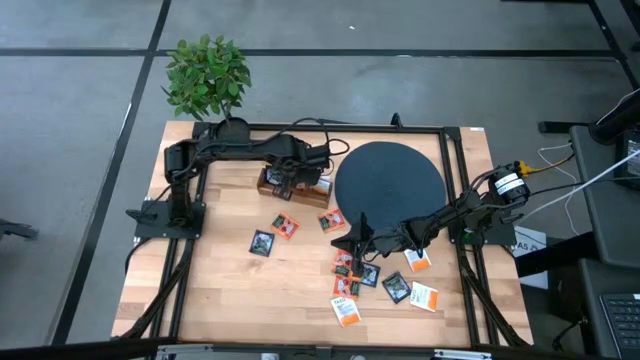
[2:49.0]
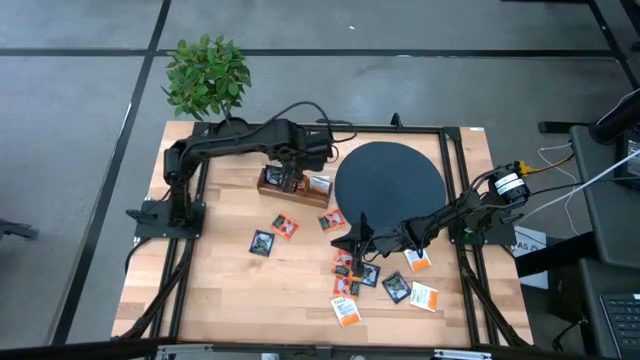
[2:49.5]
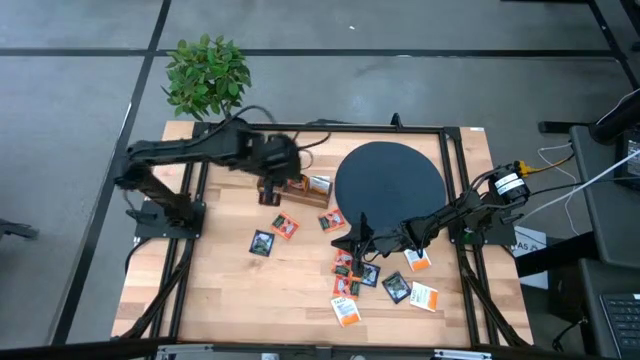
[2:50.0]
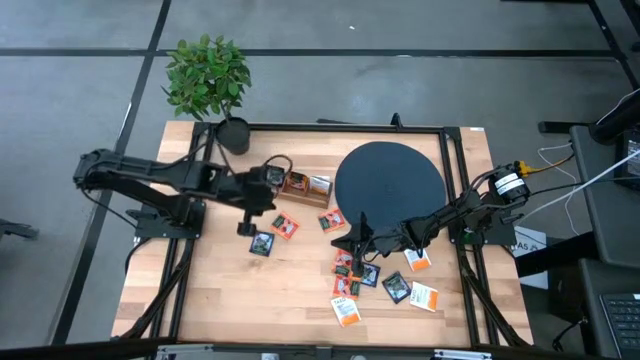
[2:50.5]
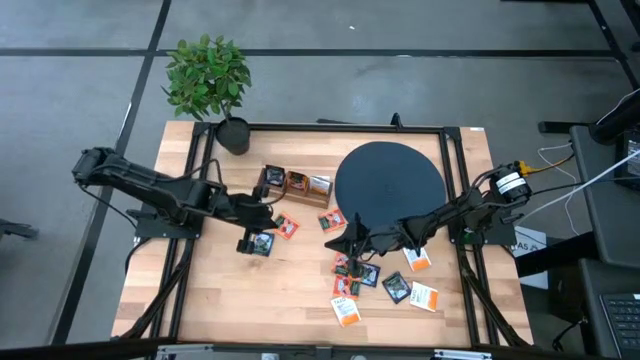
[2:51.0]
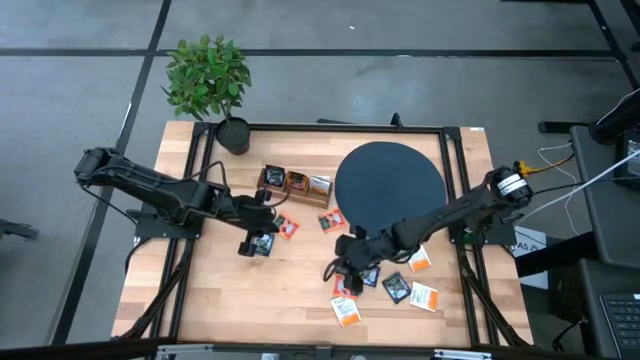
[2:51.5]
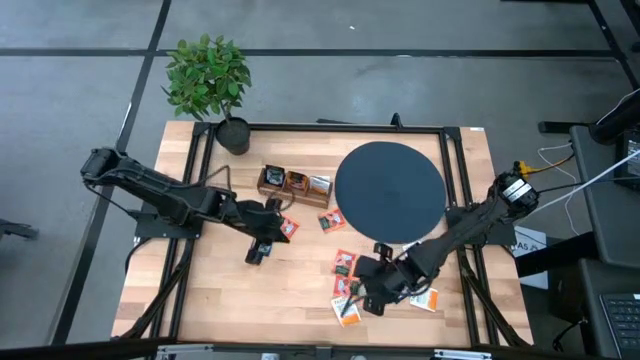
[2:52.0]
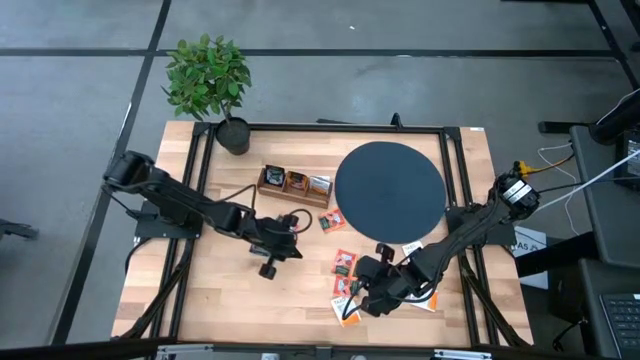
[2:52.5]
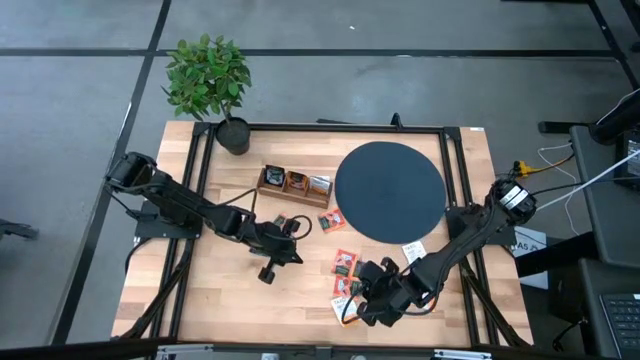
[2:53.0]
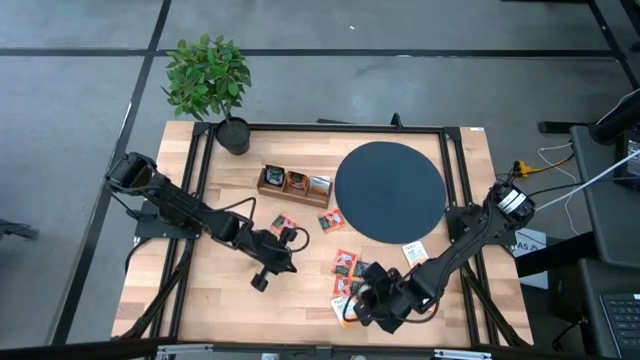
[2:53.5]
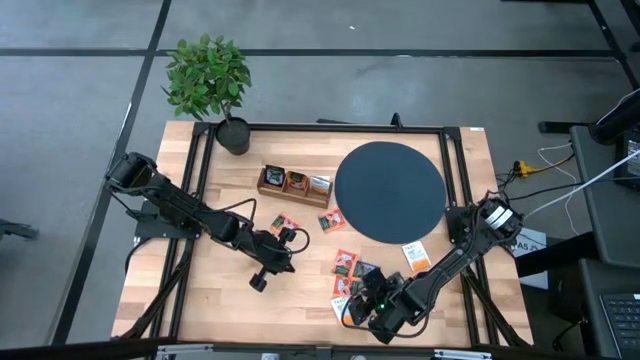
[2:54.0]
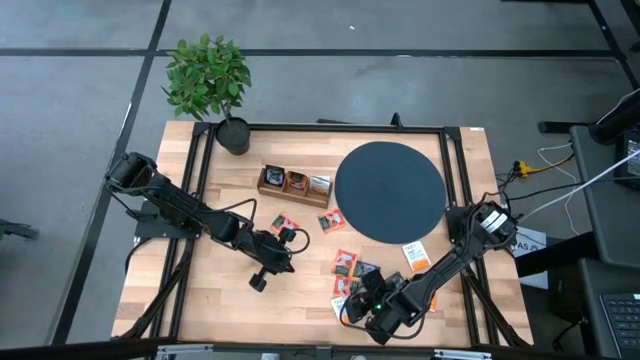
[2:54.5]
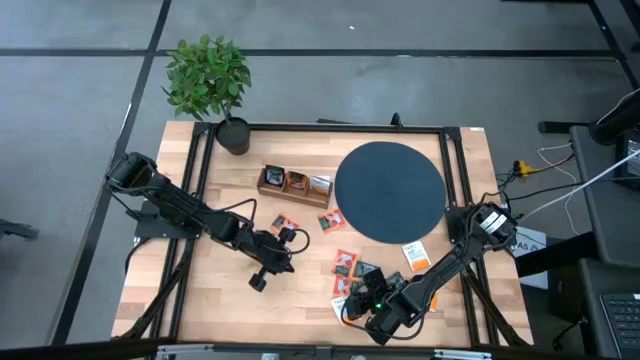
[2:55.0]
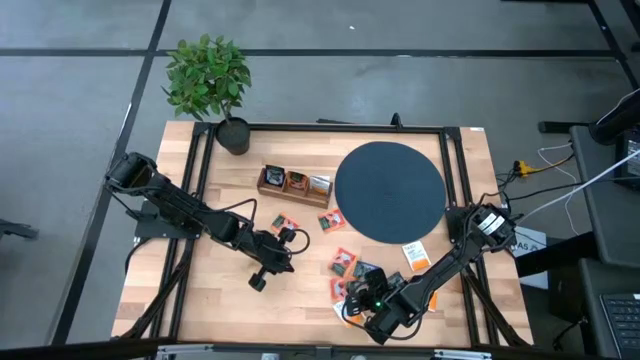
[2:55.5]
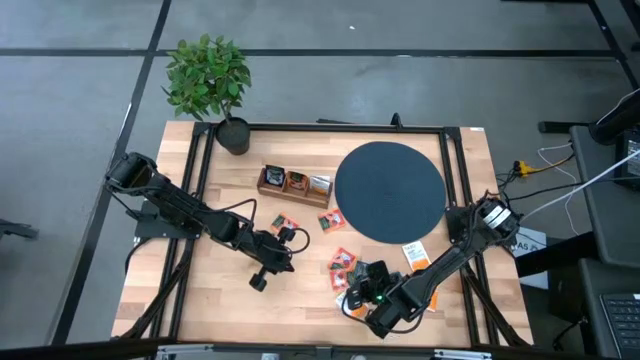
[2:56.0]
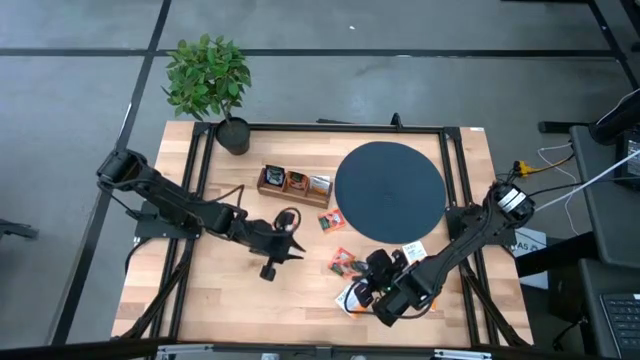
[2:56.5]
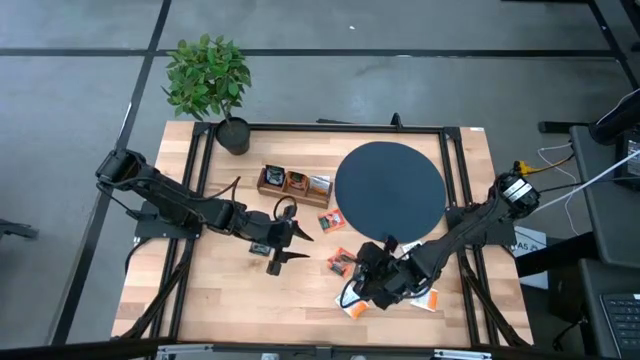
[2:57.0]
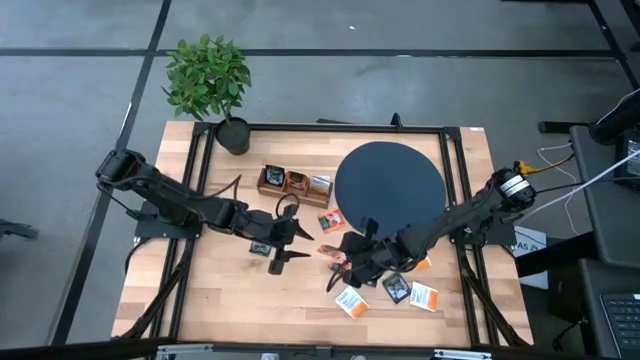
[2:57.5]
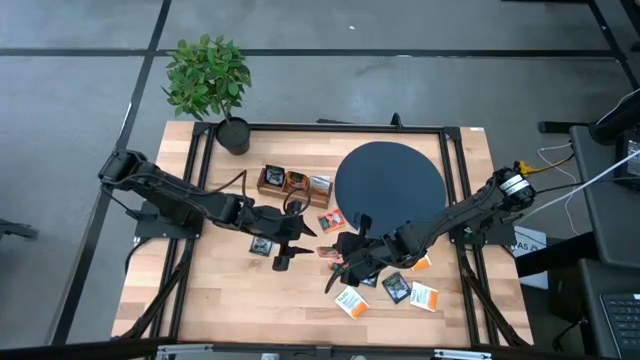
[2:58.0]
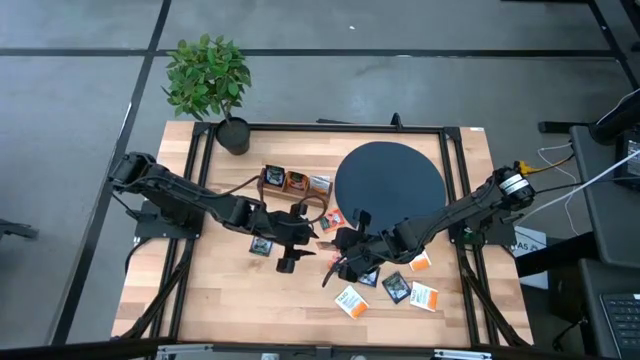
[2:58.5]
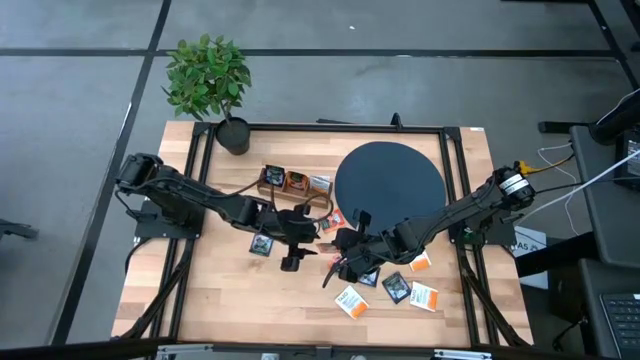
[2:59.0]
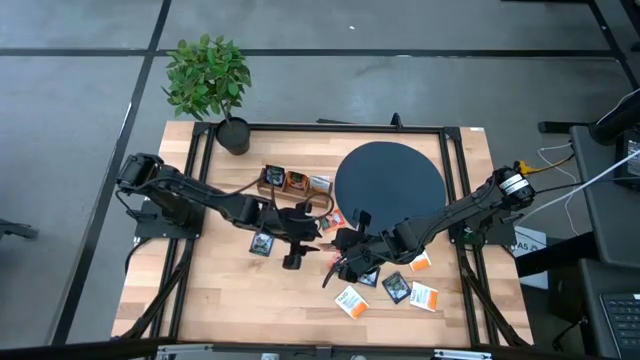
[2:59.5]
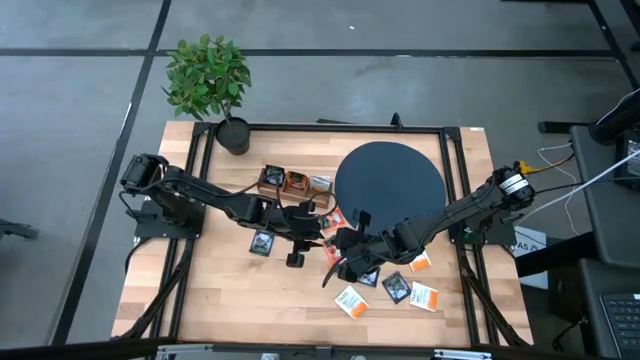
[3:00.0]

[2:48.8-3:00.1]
Task: Pick & Place Tea
Put the orange tea bag into the middle section of the wooden organizer

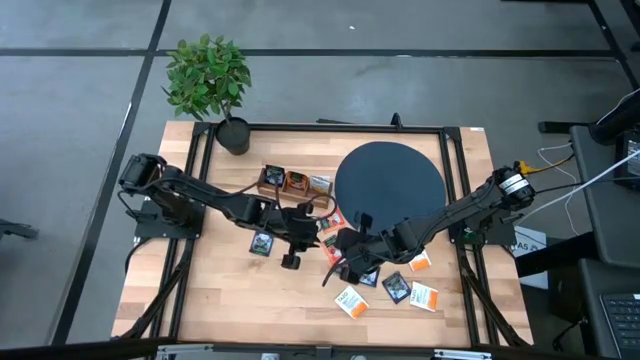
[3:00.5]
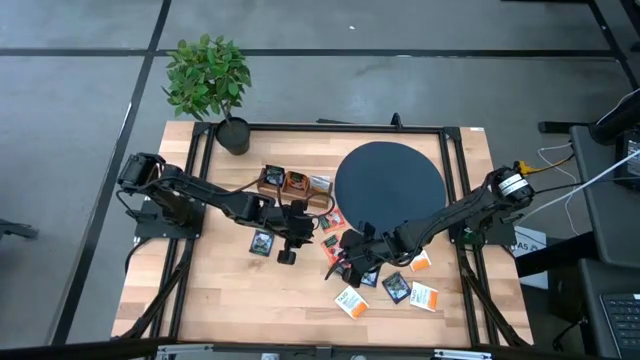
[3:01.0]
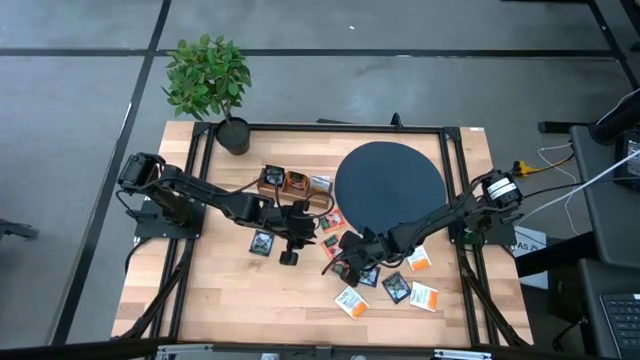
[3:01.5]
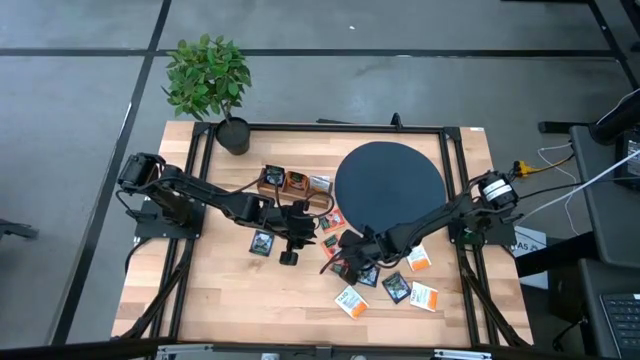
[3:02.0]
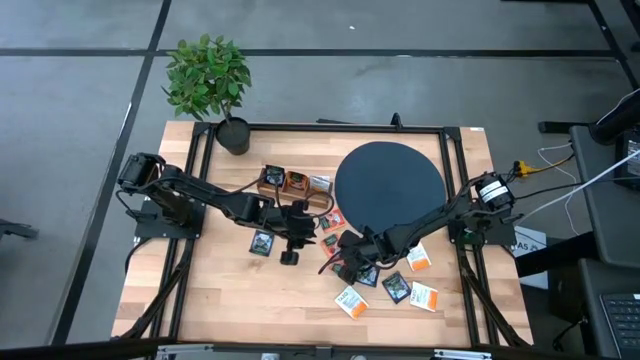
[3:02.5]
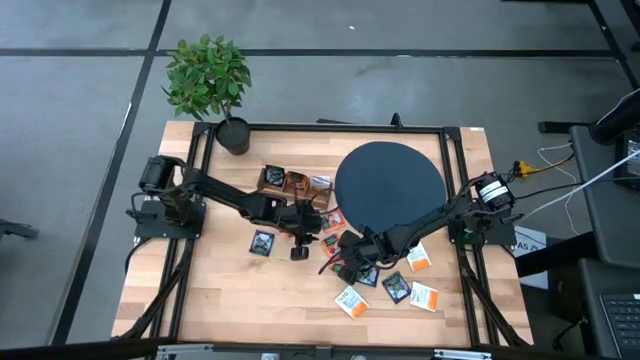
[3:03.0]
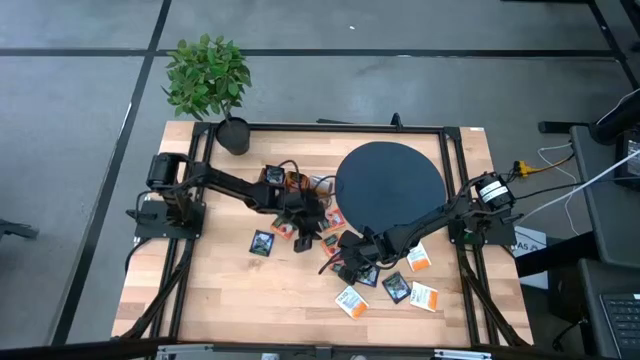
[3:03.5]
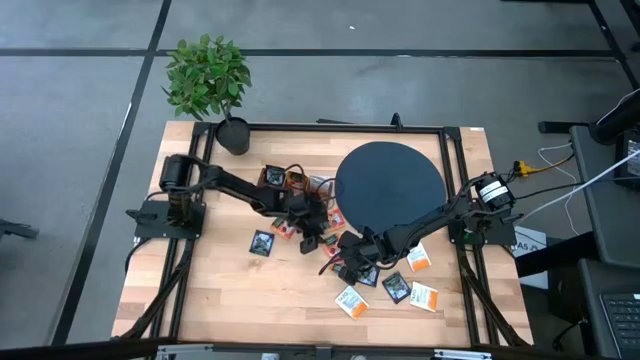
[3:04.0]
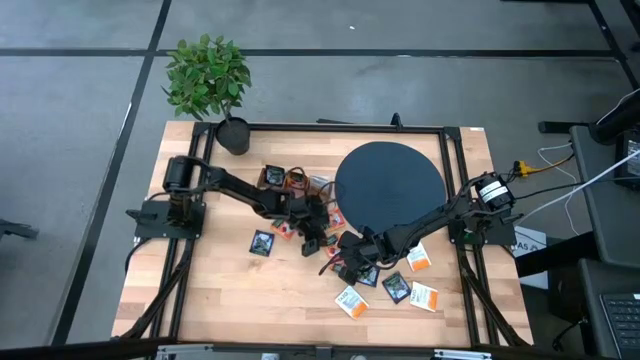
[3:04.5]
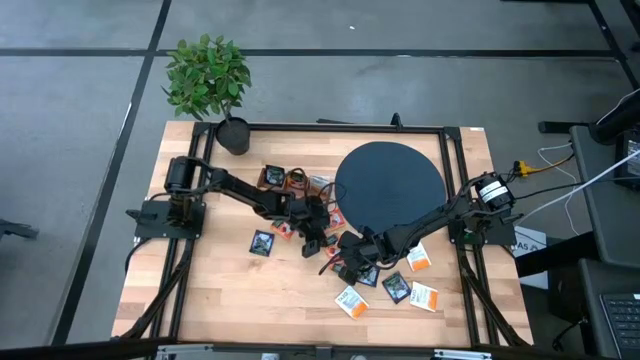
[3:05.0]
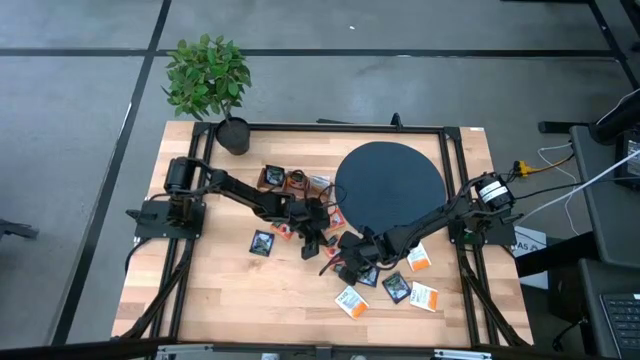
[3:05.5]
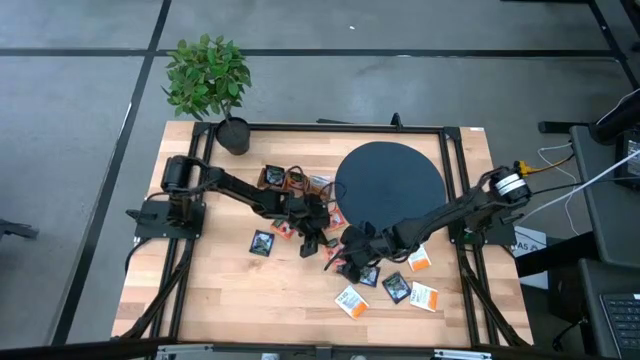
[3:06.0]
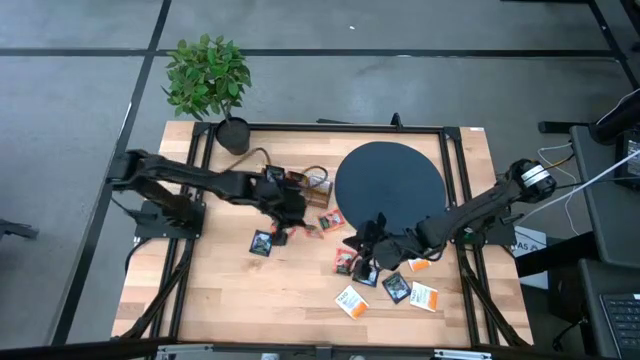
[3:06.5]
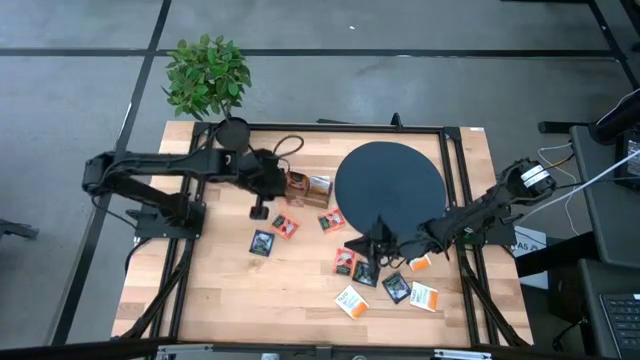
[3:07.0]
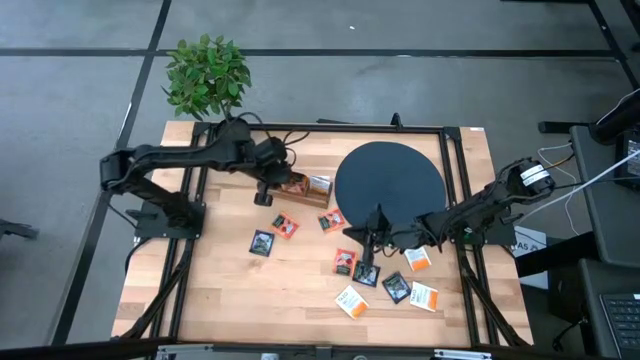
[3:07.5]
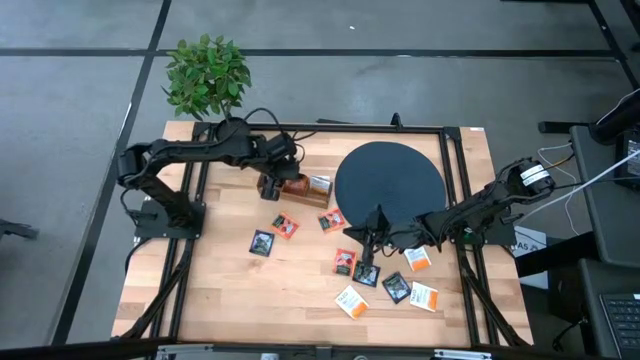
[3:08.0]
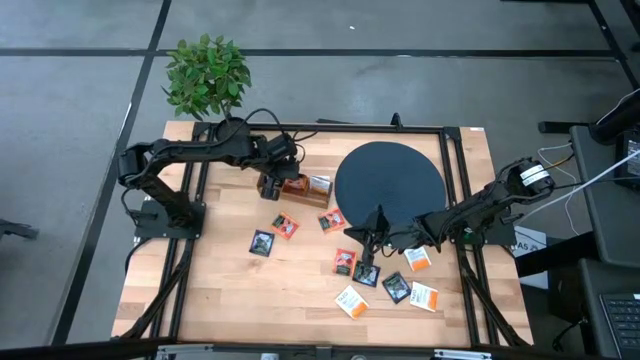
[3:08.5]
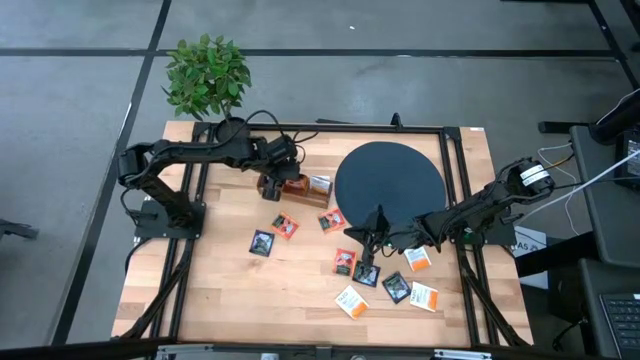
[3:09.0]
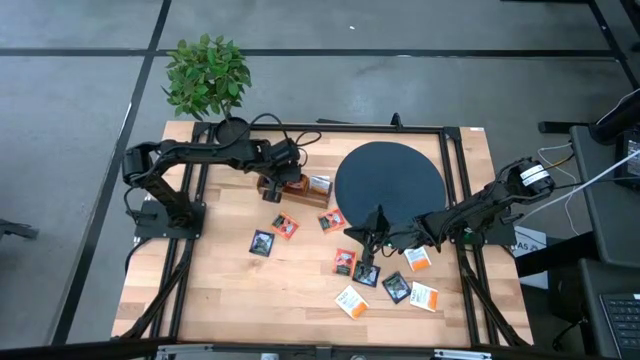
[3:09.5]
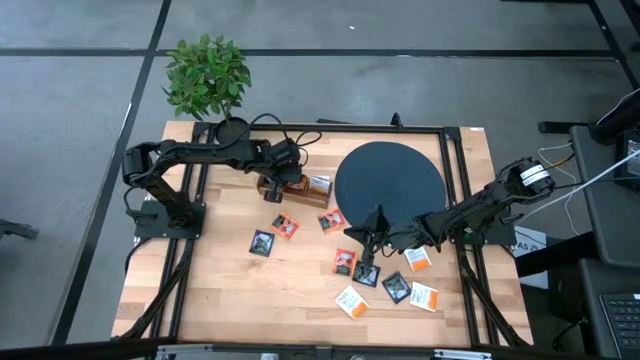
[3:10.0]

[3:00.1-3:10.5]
Put the orange tea bag into the middle section of the wooden organizer
